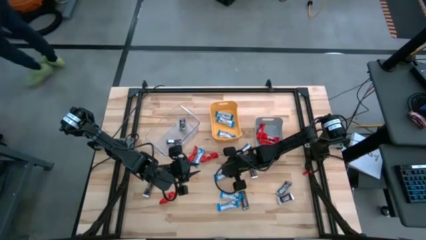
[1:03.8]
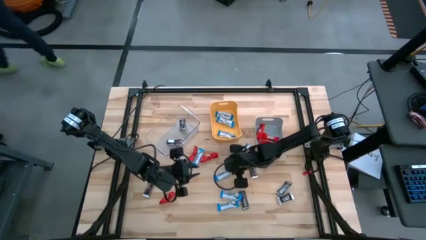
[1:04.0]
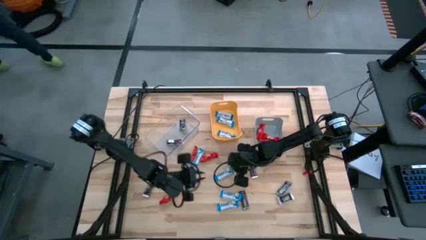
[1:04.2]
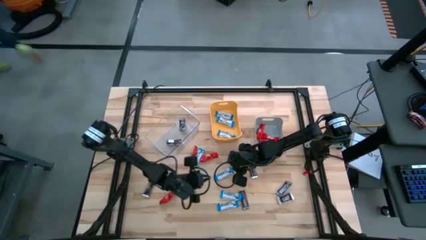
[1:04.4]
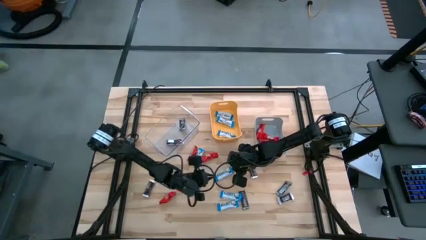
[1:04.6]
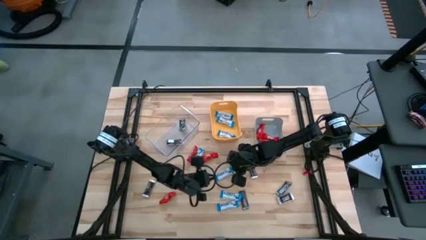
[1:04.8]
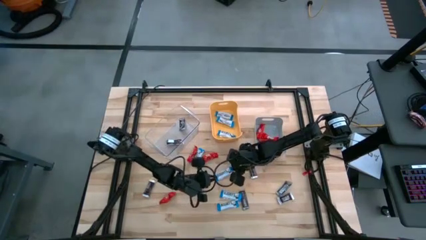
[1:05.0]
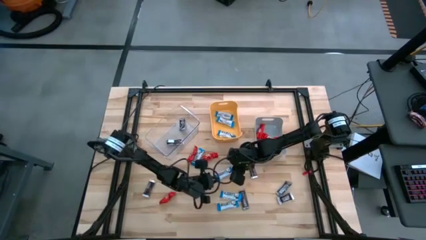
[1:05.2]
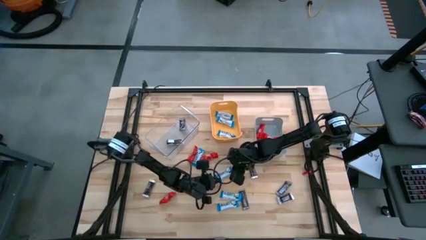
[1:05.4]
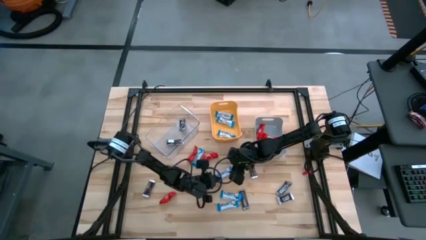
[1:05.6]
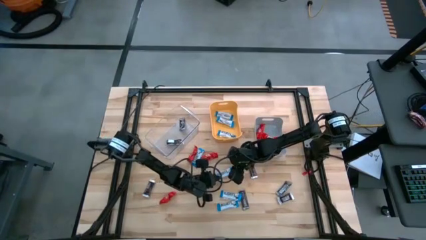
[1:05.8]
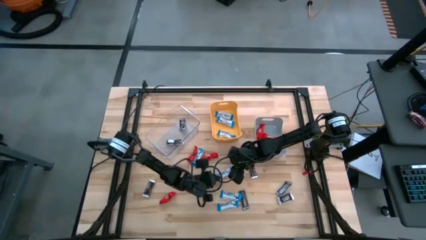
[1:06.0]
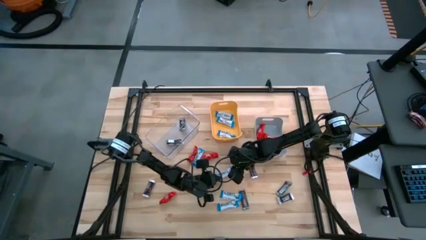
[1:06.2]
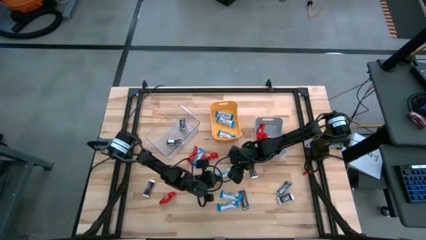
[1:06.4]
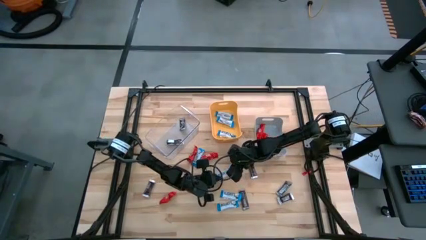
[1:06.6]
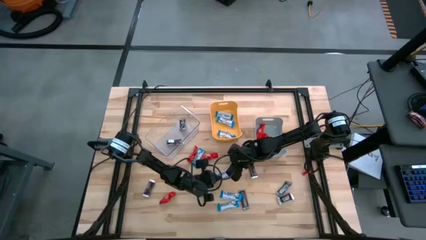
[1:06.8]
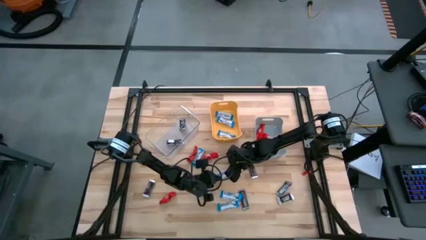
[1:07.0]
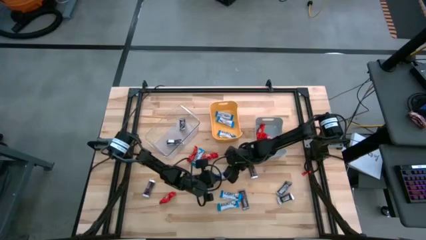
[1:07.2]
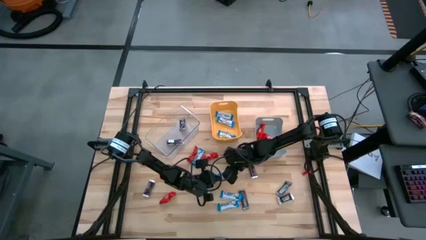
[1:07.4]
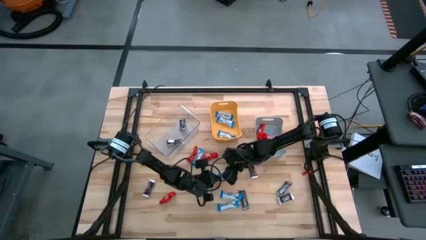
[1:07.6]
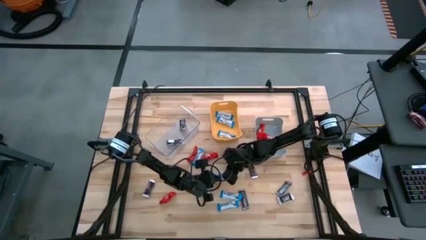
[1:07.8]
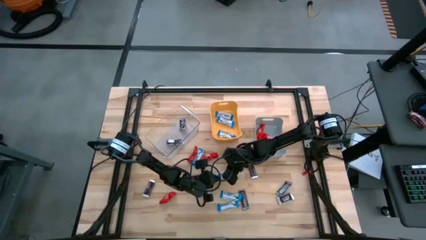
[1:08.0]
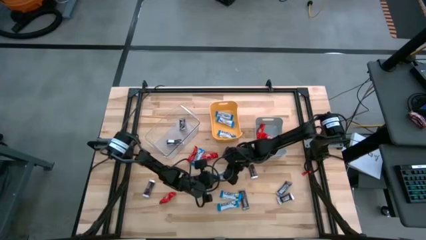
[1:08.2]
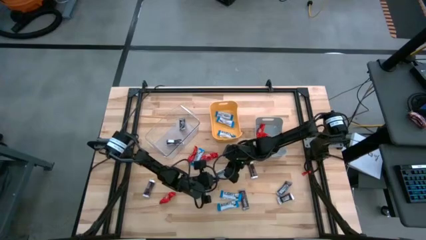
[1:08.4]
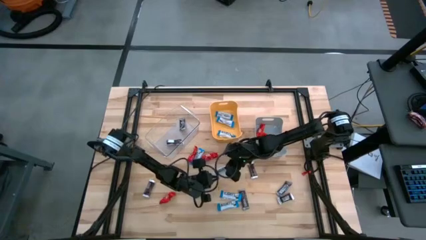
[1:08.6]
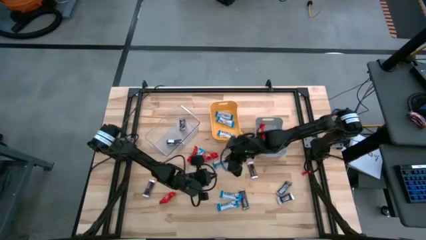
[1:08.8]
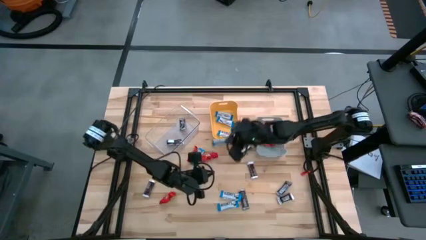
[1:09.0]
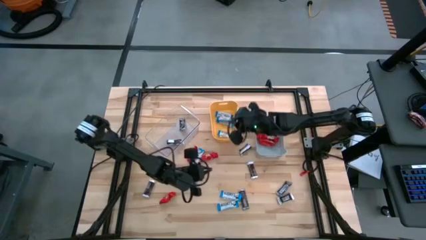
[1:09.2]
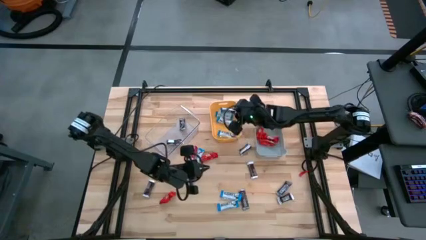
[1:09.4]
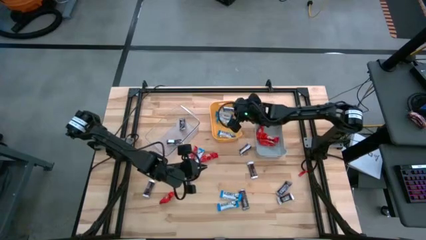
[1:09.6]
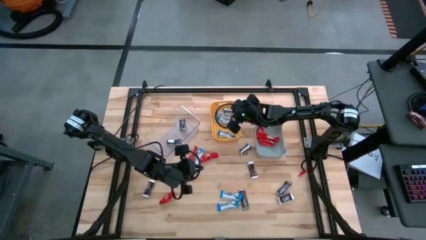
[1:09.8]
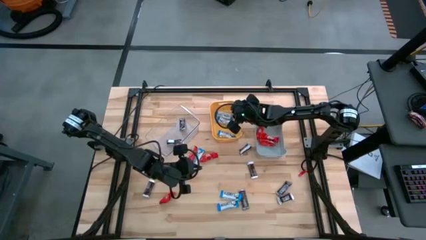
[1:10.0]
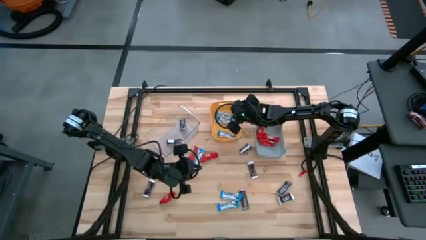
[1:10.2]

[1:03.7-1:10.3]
Task: Organize candy in baskets
Put the white chocolate into the yellow bin

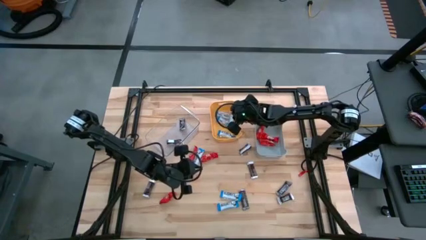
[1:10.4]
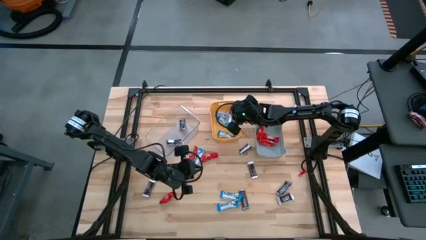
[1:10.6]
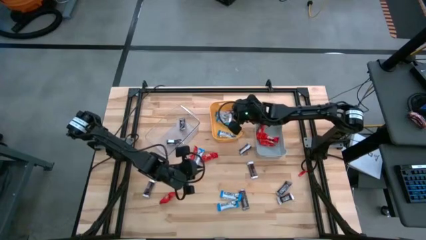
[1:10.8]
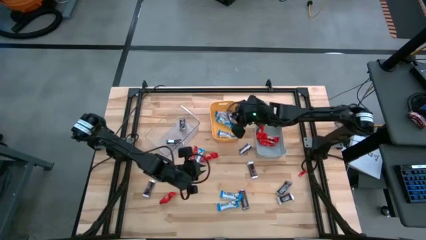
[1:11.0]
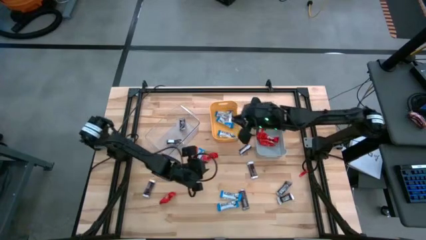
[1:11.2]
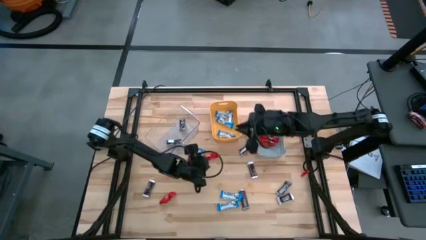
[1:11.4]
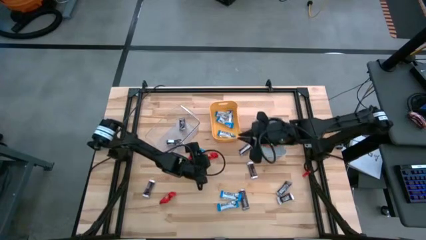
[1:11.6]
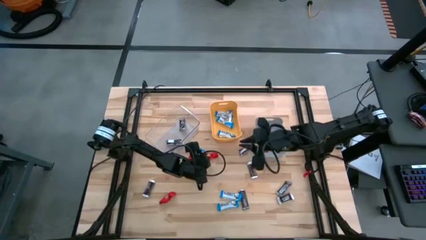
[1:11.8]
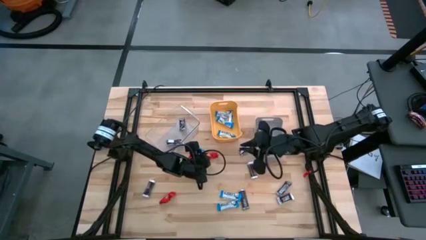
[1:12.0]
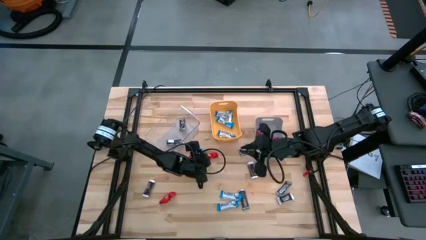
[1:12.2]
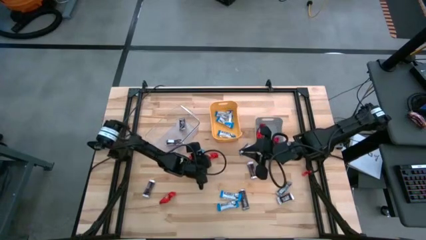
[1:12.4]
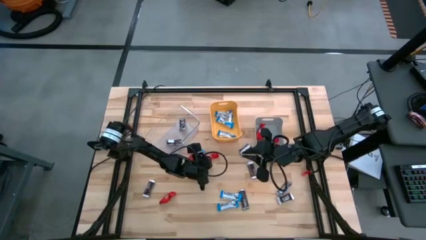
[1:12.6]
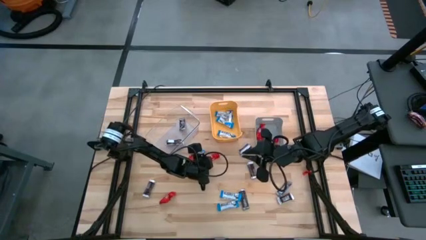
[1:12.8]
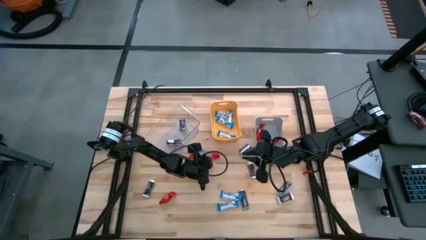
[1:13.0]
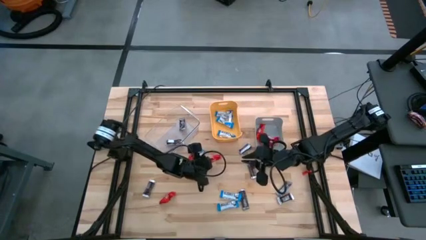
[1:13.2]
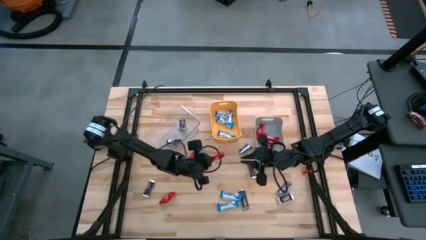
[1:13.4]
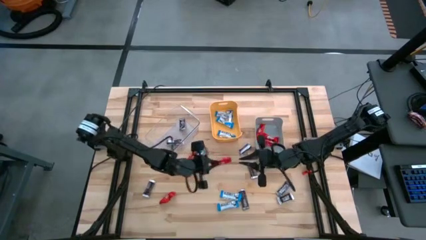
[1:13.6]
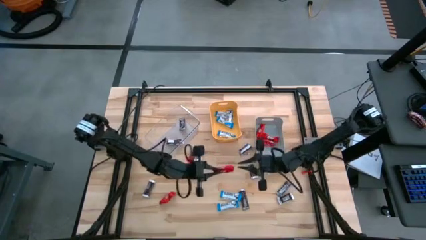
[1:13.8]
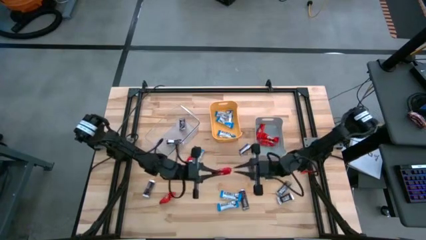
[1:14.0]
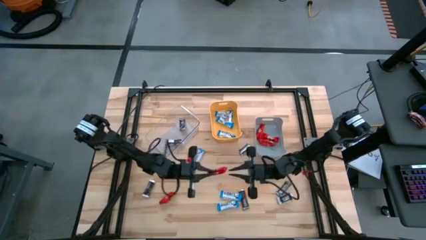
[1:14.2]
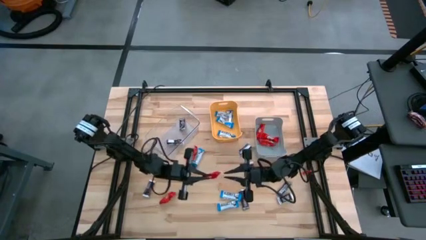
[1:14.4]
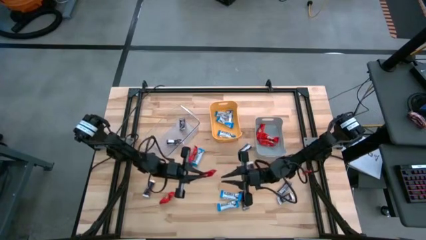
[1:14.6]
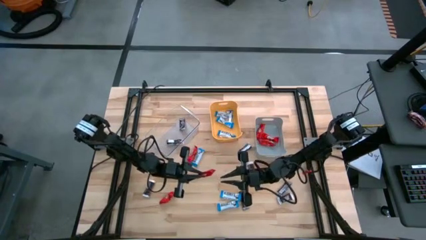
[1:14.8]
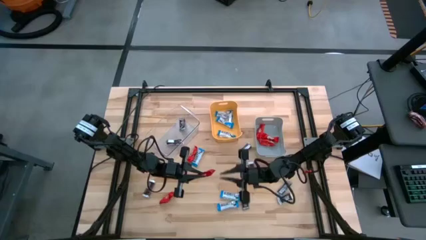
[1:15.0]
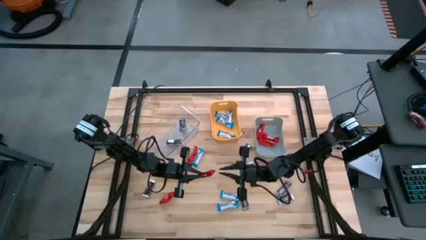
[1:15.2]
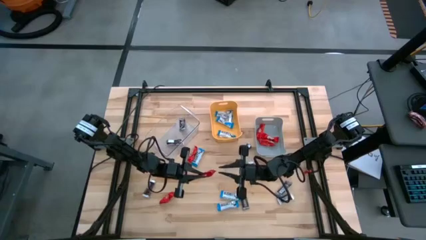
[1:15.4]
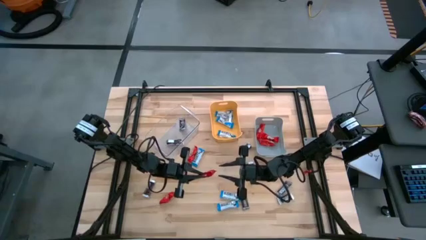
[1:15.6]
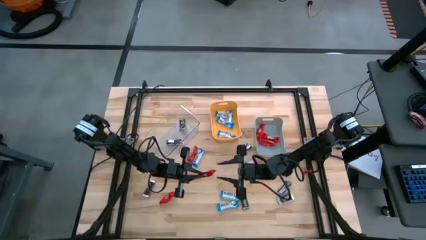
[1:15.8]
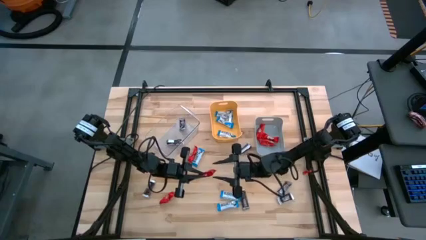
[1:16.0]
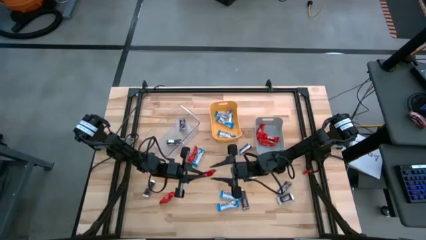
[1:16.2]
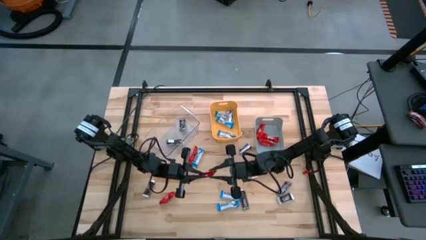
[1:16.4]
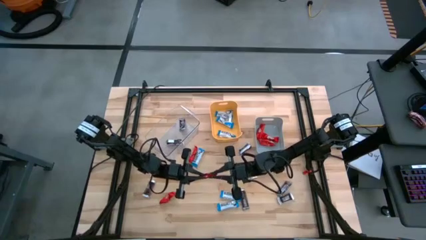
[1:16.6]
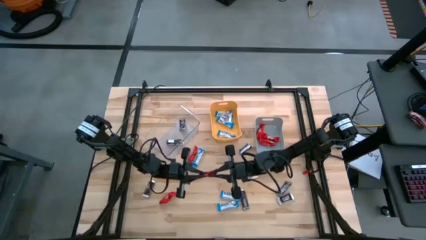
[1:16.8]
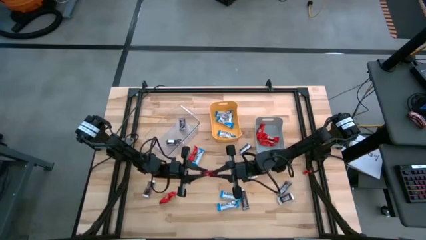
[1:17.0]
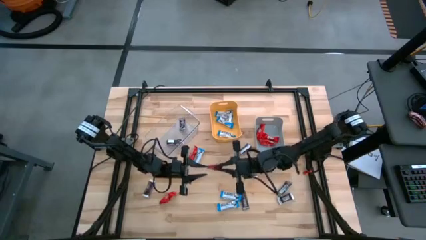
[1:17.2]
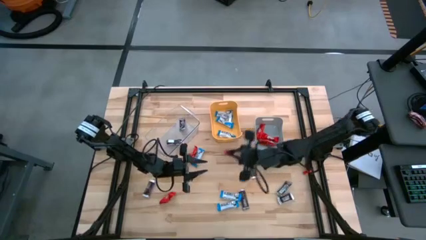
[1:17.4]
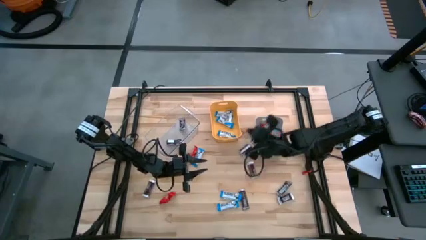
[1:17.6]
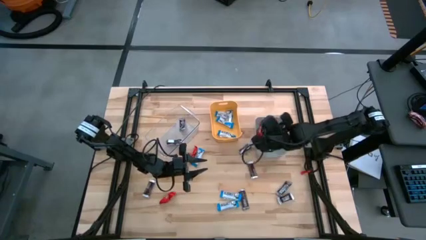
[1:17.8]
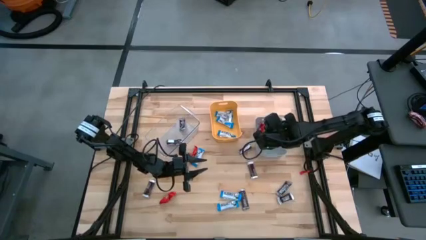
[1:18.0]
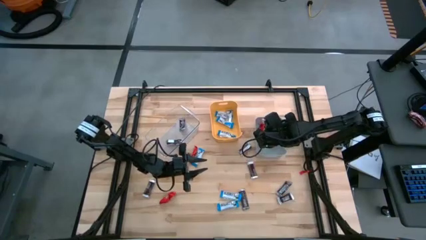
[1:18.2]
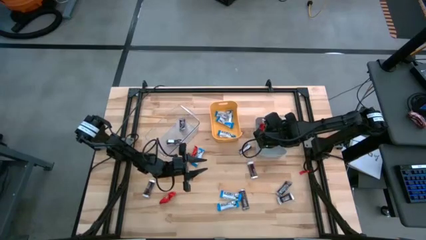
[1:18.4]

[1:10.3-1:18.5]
Put the red chocolate into the gray bin

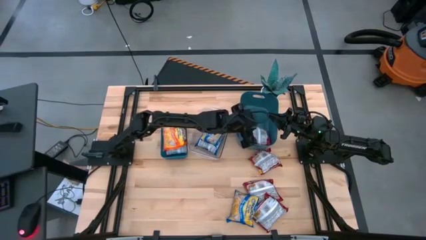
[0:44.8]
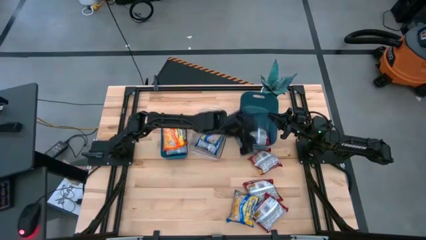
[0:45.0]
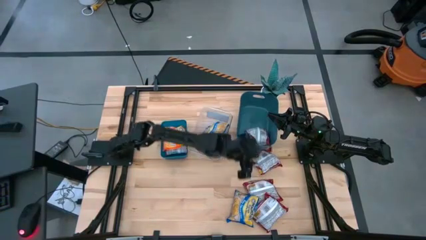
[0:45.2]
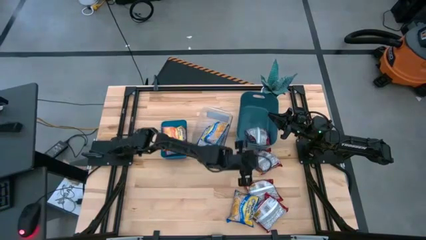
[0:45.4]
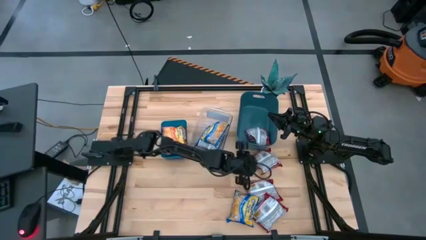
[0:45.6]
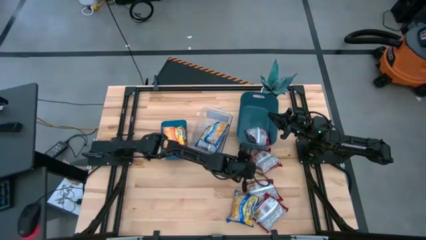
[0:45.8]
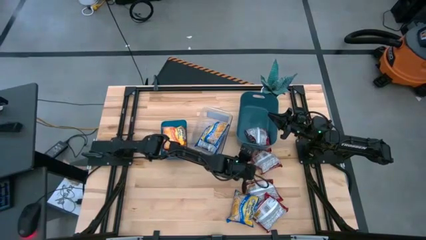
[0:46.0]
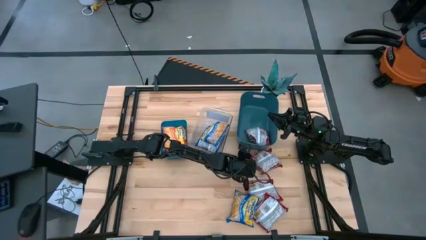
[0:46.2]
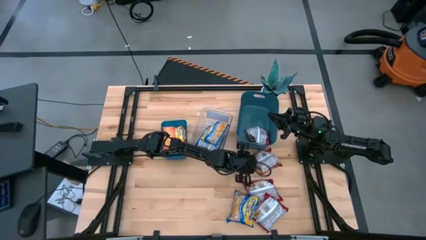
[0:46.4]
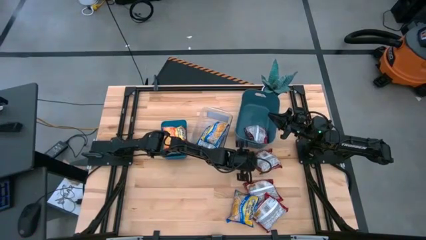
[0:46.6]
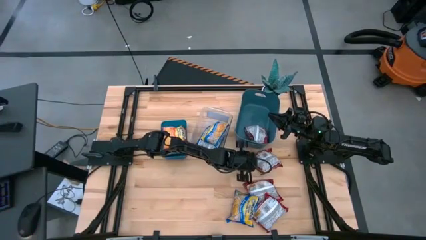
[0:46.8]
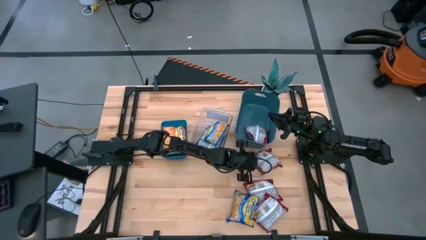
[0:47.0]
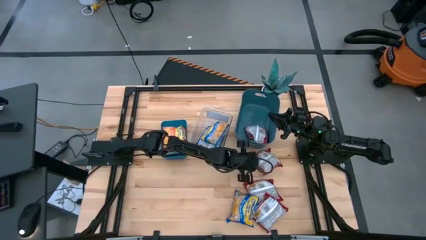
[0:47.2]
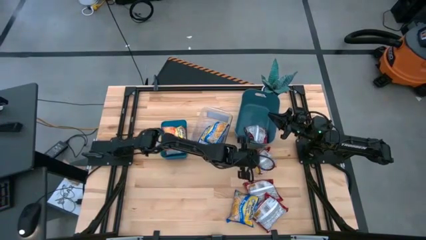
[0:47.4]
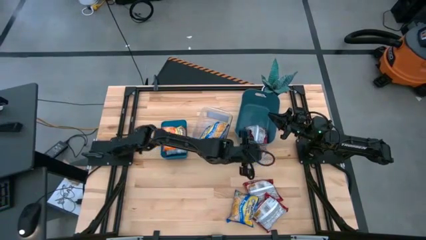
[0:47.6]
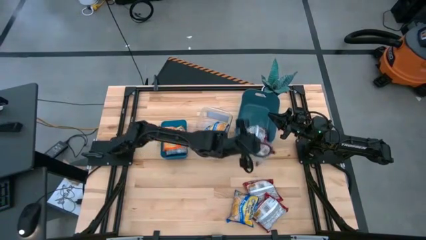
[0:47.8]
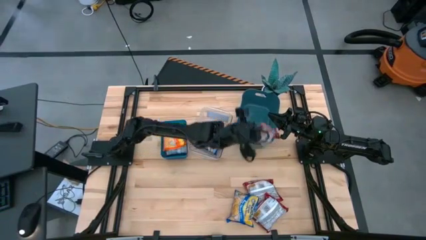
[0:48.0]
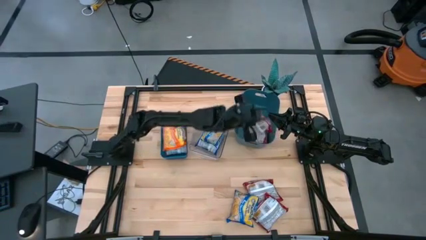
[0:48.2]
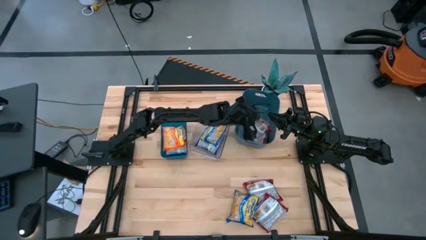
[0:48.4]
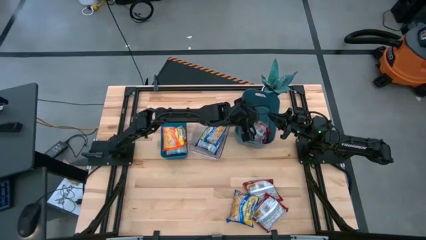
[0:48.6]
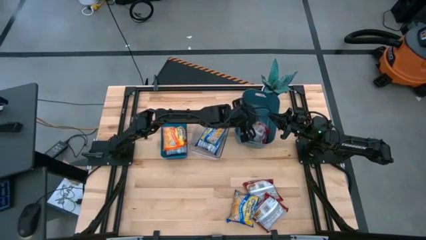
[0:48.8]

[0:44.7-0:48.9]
Task: Sort Maruchan noodles
Put the red noodle pack into the dark green bin
